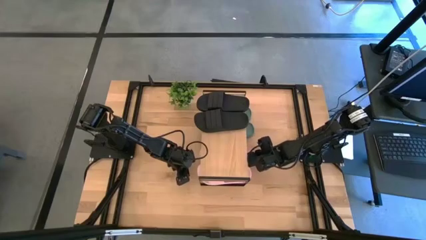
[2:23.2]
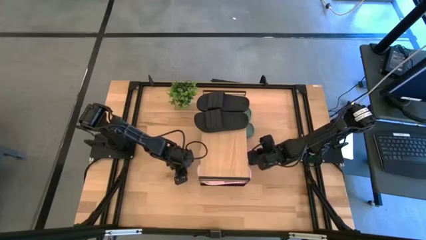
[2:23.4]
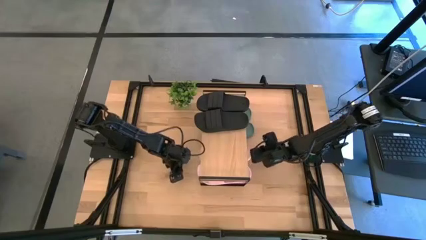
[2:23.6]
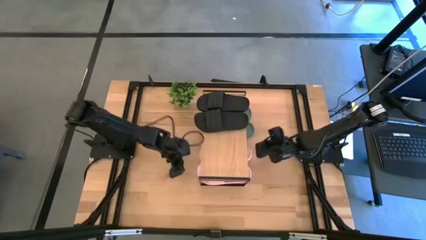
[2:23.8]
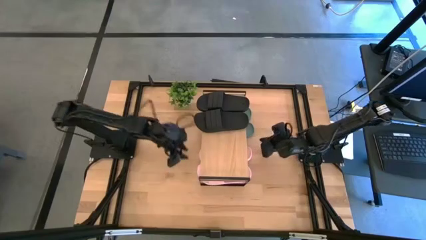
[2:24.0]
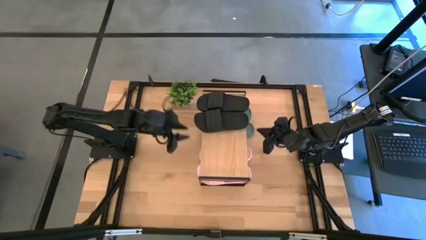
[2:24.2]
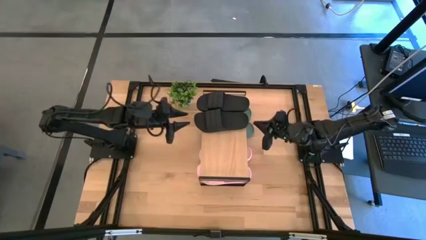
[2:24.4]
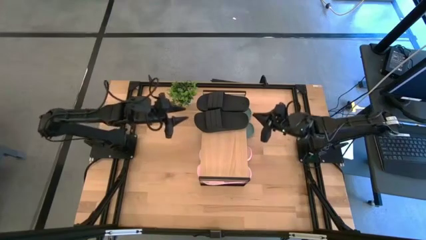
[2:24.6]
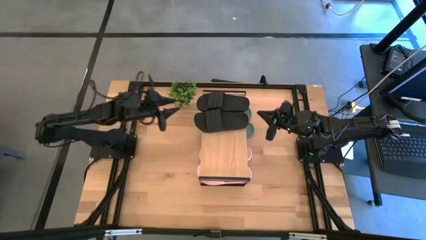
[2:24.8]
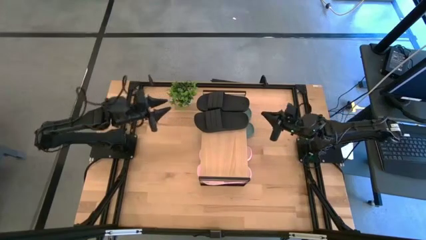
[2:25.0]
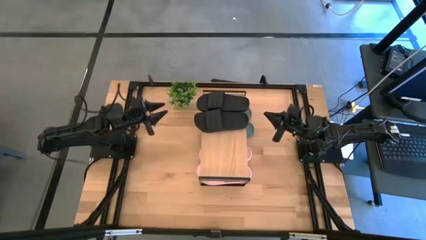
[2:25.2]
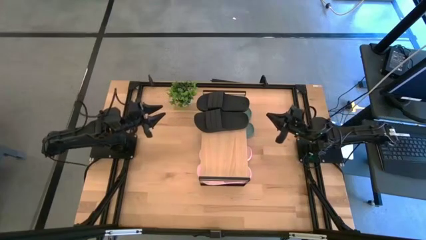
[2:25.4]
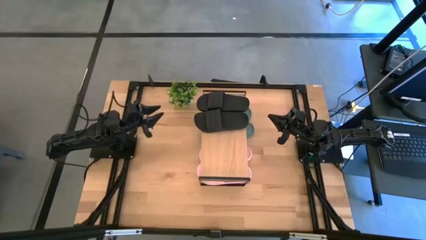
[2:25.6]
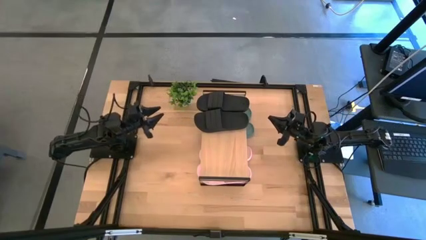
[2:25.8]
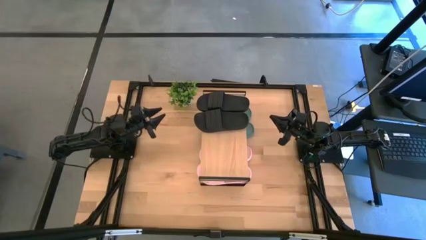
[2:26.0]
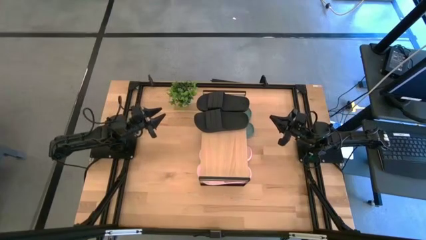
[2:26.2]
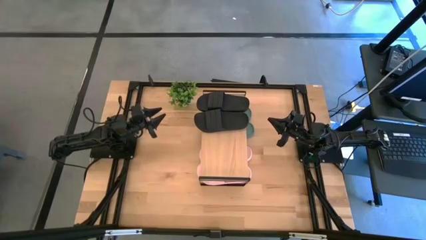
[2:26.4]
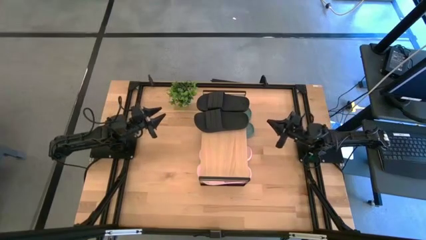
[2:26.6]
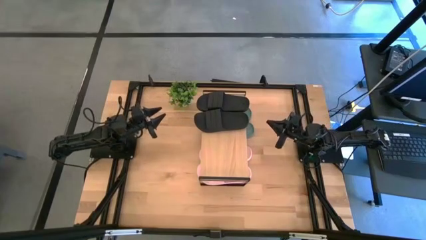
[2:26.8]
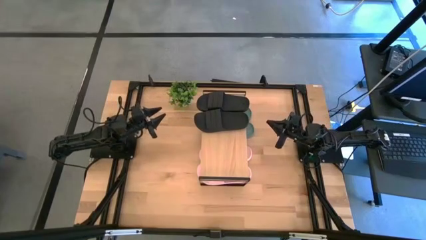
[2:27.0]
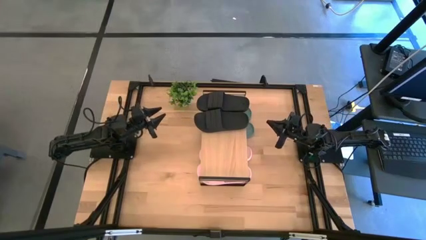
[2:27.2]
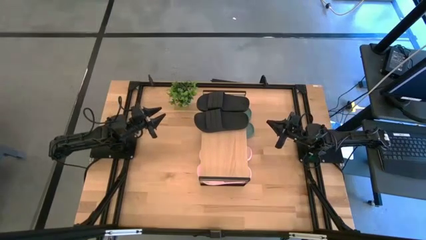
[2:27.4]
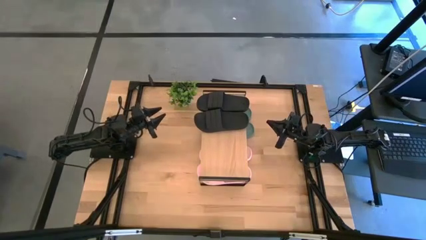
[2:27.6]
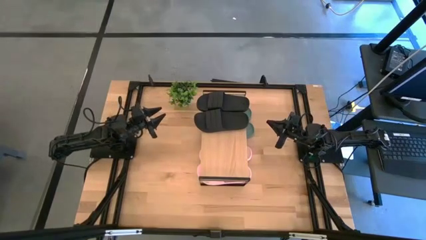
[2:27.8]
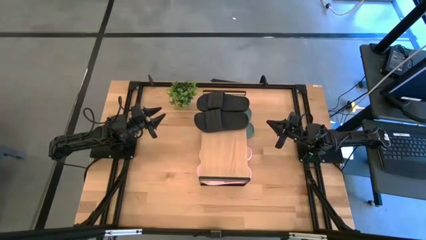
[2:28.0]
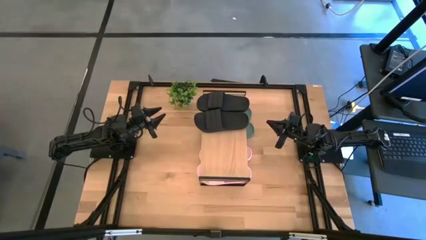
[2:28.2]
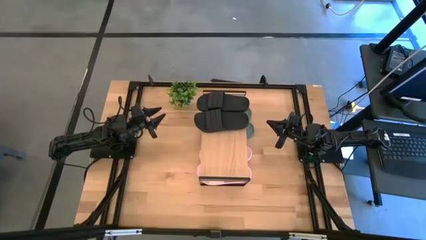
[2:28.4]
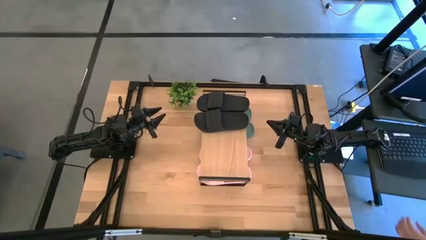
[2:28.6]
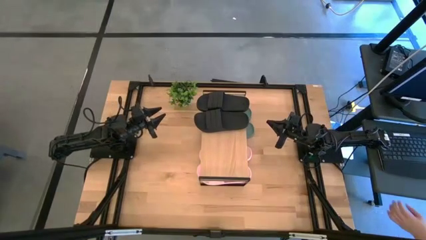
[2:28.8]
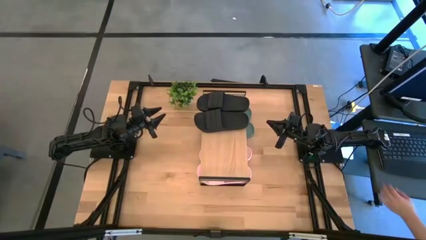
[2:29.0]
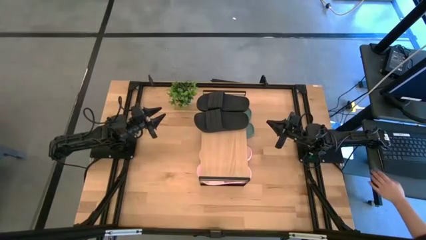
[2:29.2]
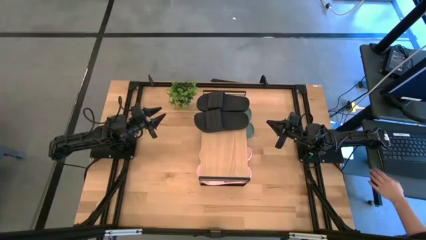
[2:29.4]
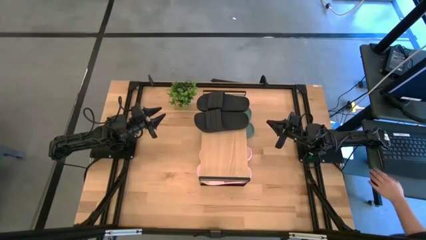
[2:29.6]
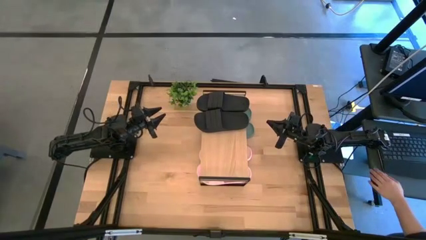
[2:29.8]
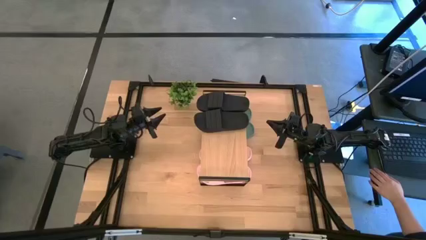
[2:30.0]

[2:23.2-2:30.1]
Task: Pick and place slides into the shelf
Return to Home Position

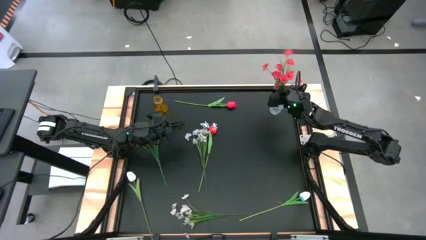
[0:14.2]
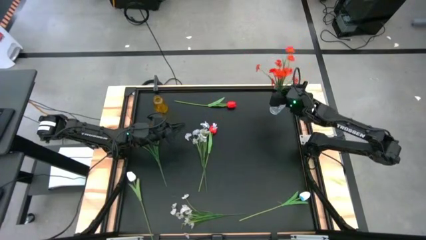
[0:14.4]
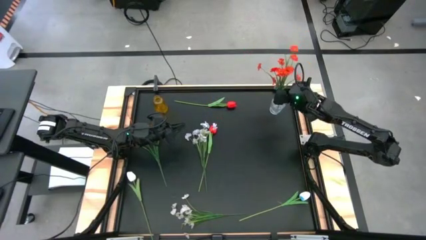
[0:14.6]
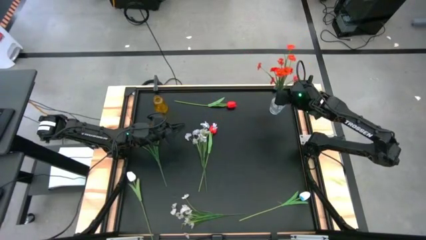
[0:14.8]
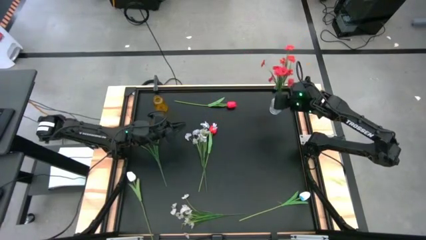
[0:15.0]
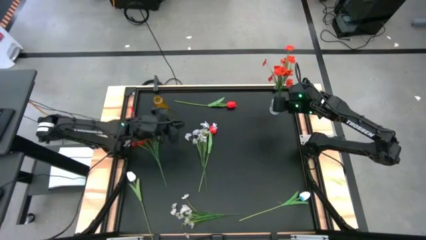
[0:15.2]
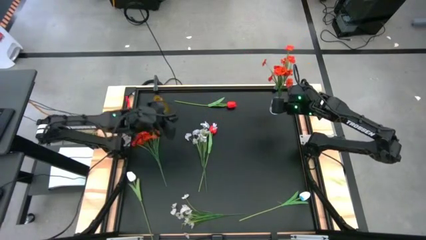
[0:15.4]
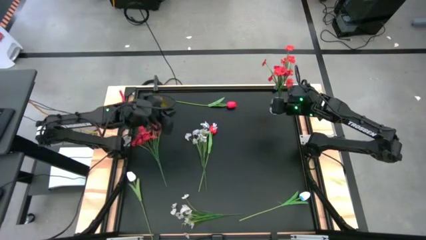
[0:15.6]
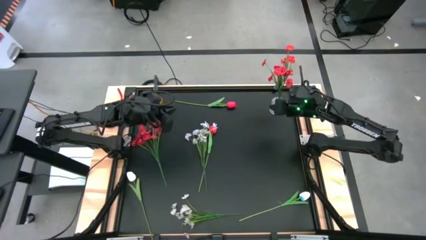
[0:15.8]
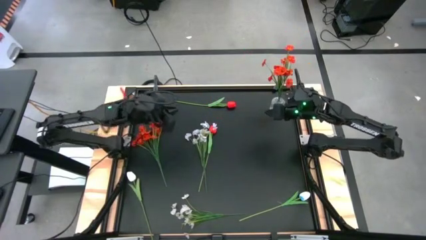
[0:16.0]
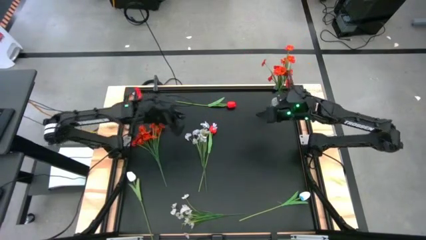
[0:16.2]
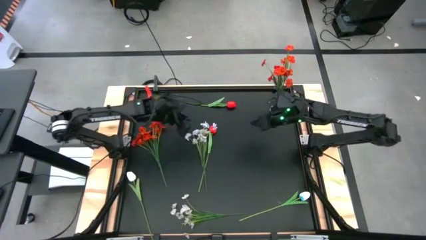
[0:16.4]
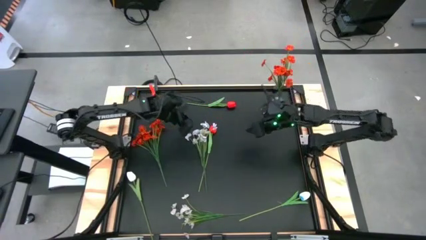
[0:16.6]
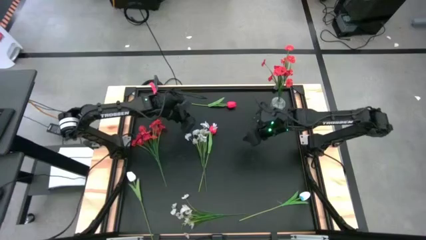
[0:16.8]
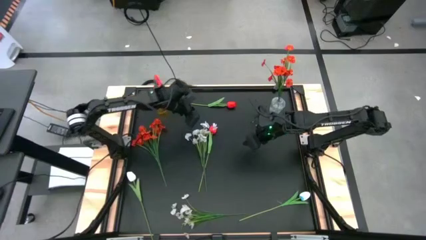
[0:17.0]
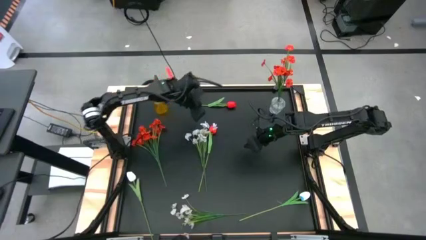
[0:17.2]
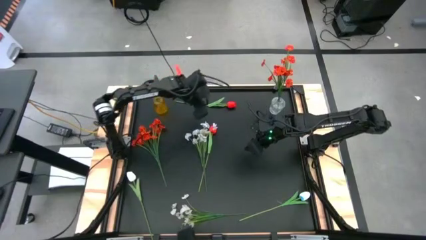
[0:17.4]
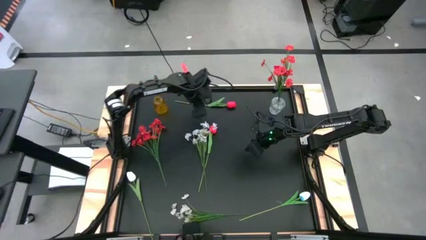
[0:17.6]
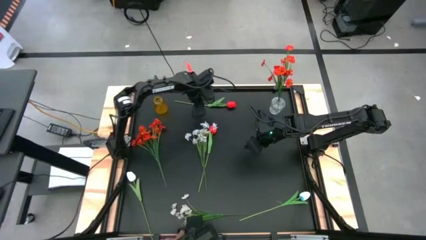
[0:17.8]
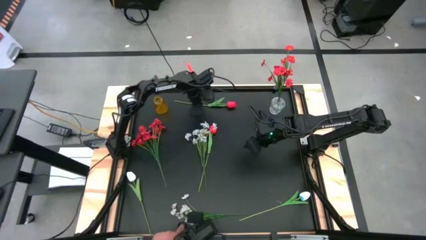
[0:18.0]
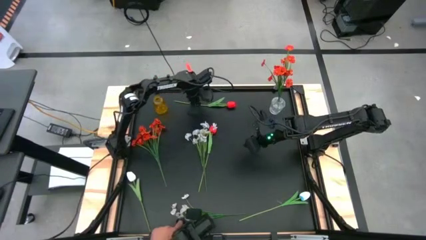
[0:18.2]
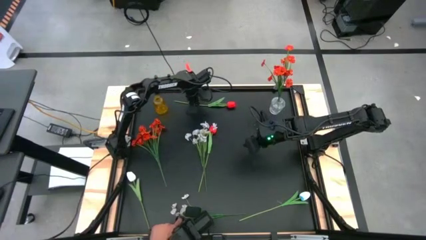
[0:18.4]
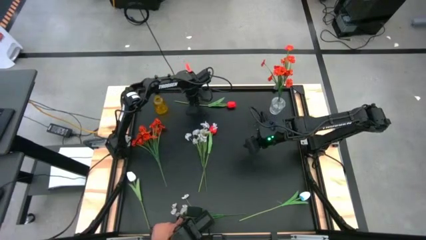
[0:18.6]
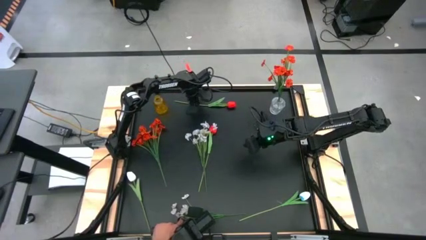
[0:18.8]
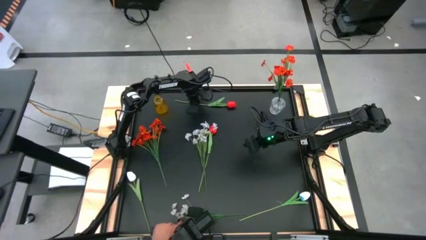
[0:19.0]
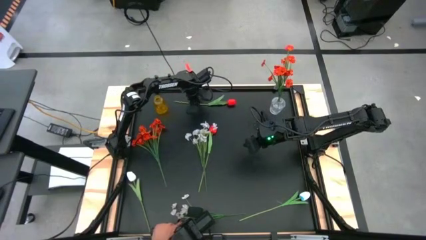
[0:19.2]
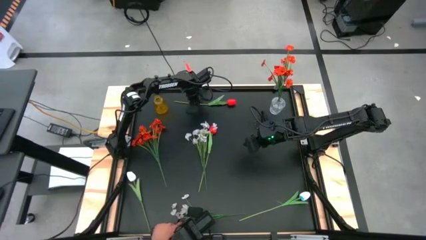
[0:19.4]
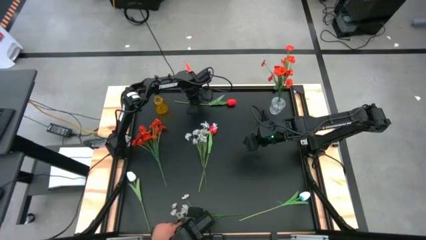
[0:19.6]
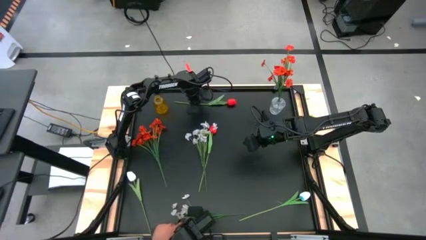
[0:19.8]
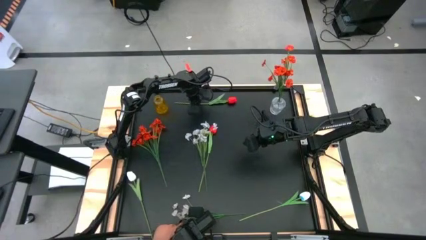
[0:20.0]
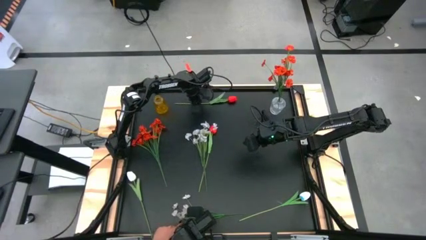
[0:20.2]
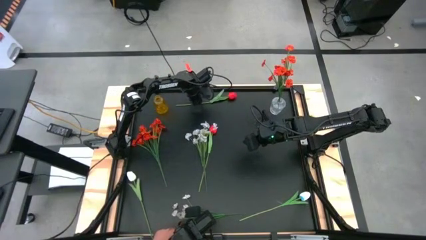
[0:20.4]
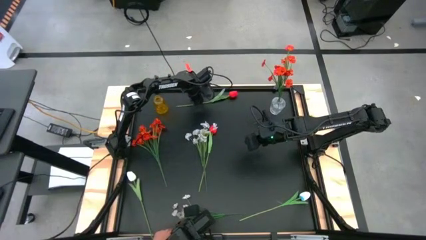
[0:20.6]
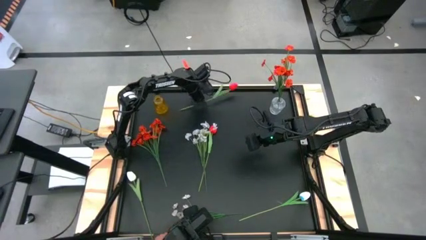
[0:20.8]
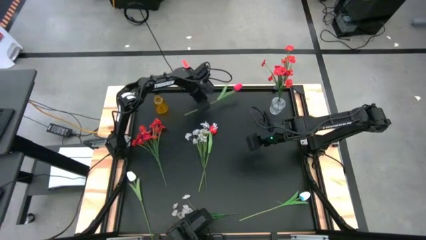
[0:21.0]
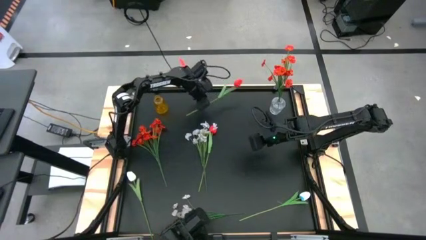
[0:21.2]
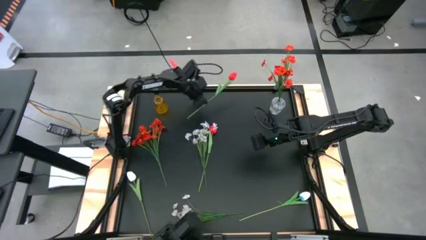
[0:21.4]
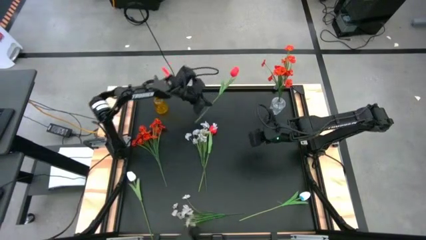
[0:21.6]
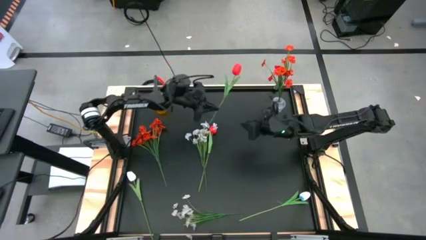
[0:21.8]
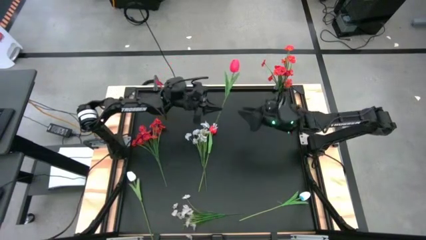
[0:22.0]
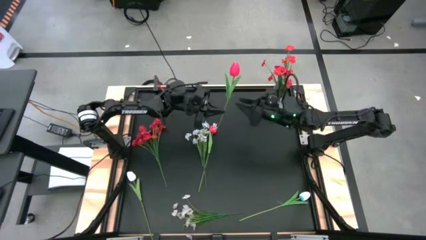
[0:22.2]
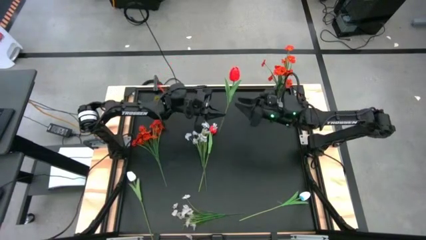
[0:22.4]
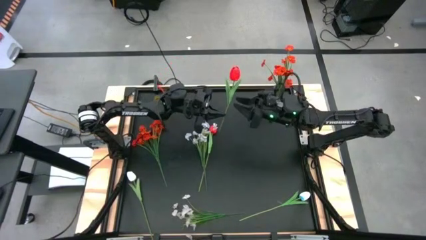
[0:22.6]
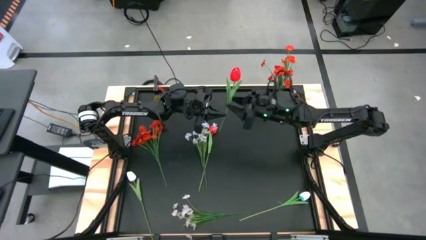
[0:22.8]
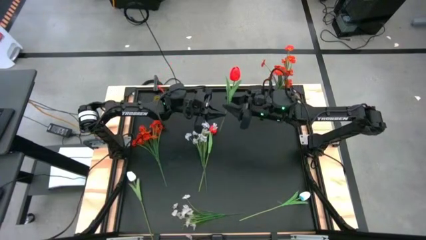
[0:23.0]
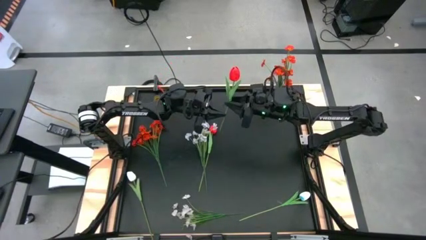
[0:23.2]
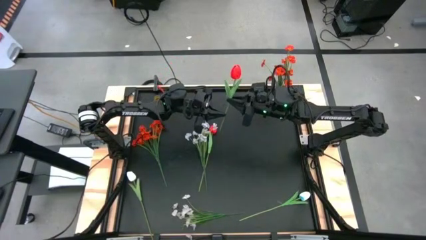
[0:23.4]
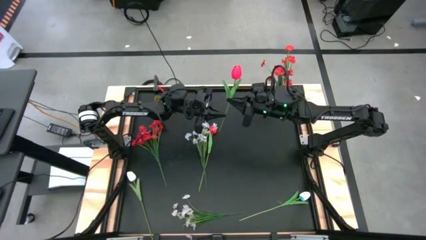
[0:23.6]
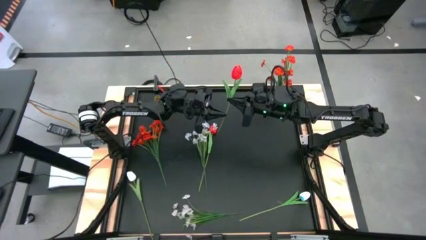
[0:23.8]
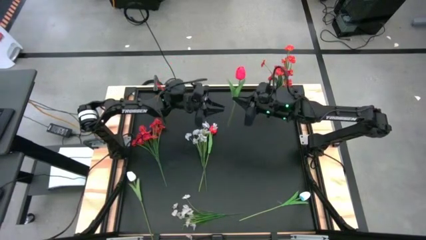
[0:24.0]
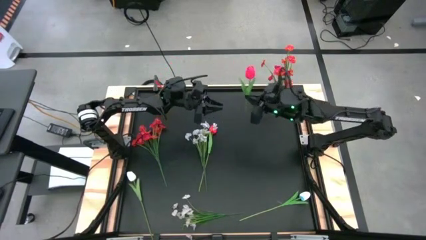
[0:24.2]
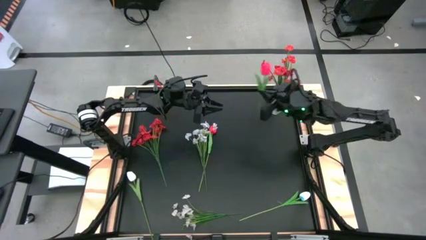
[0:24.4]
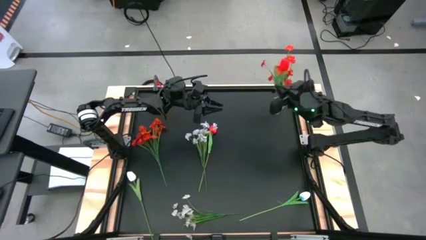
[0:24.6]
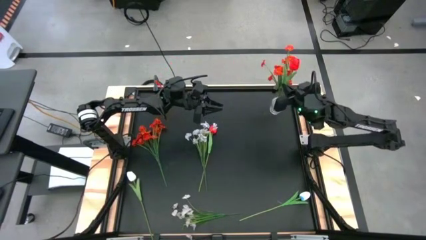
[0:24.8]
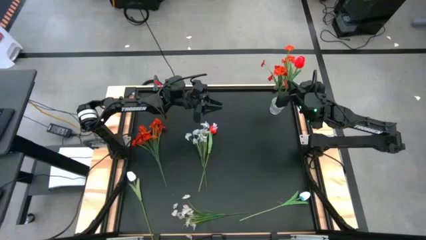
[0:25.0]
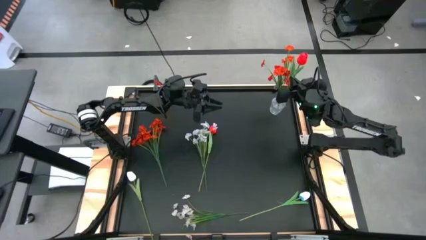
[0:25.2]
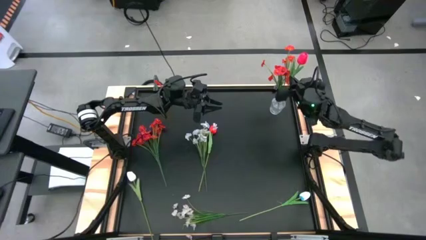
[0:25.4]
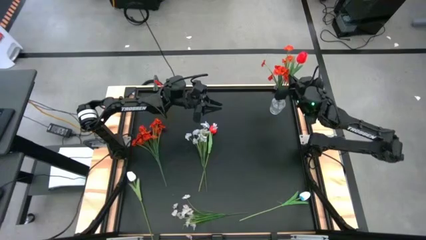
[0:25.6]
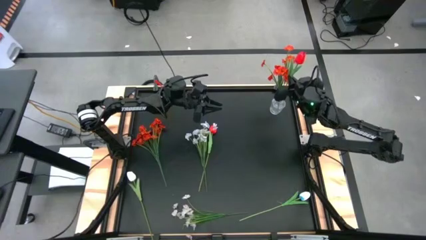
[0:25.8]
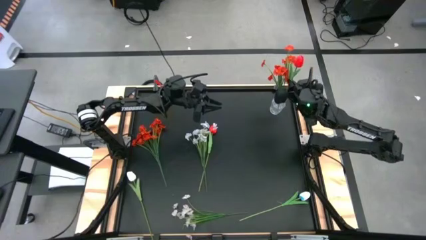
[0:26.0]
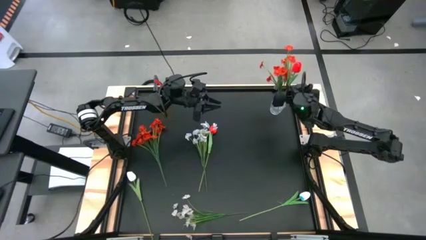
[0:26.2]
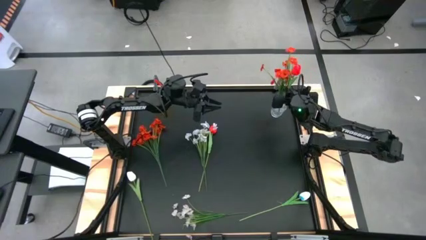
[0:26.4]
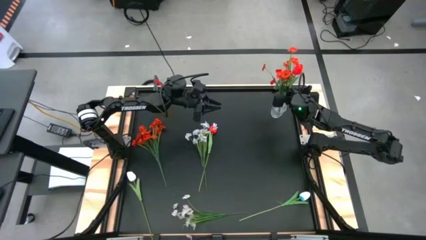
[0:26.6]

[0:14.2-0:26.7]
Task: Sort flowers into vase by color
Put the top red flower into the transparent vase
